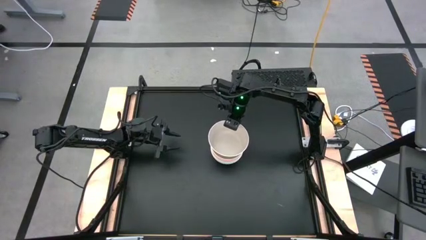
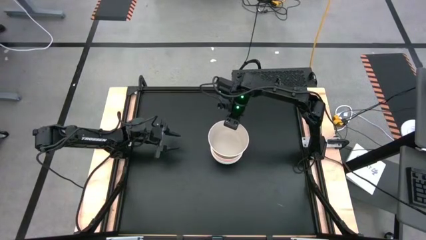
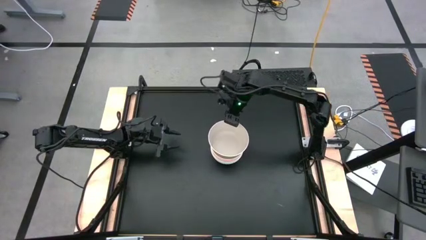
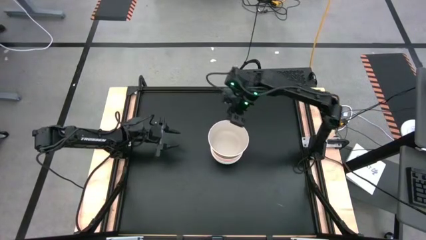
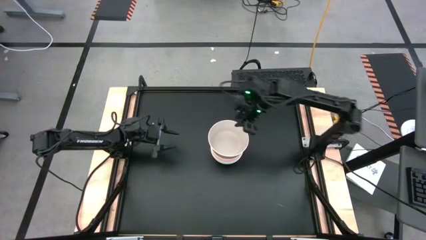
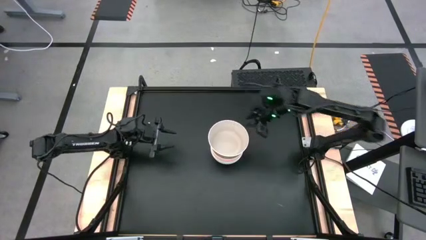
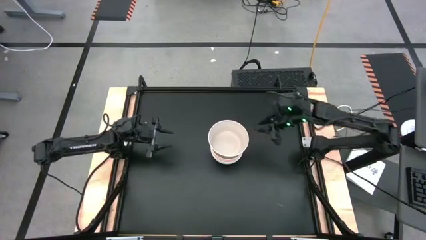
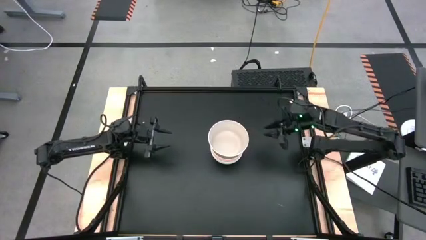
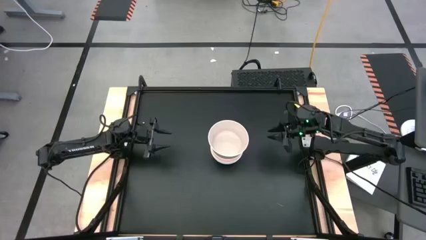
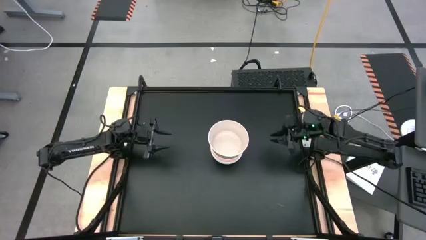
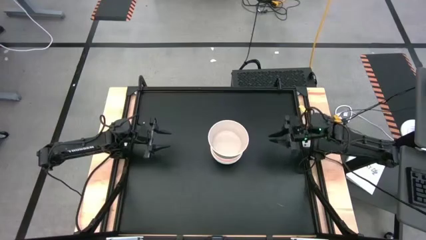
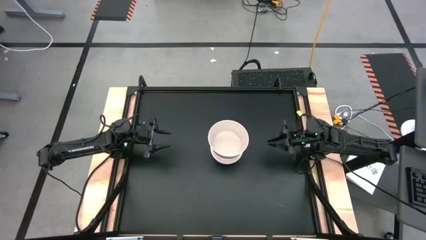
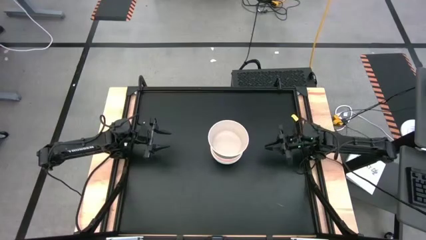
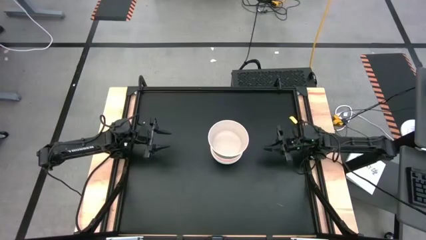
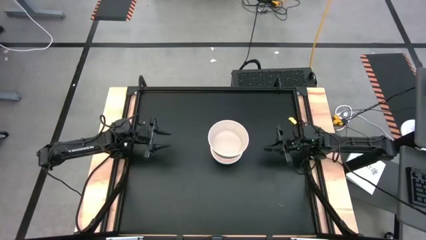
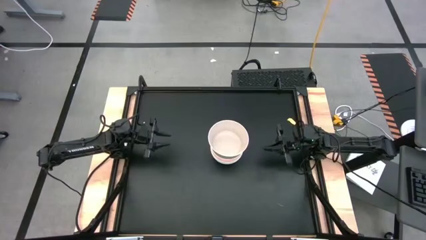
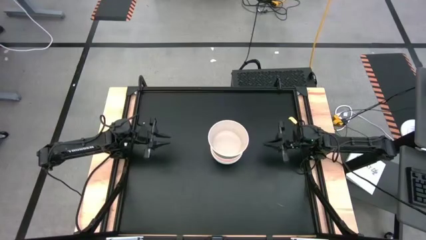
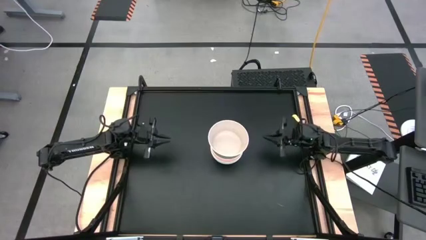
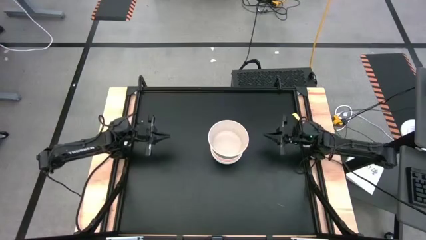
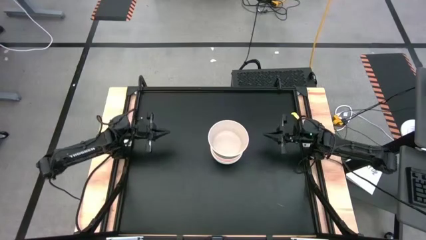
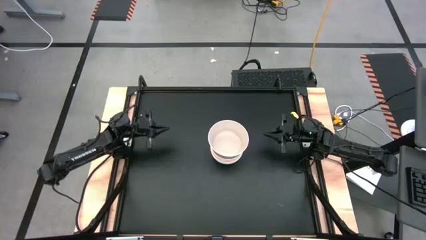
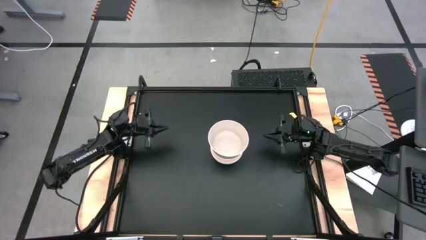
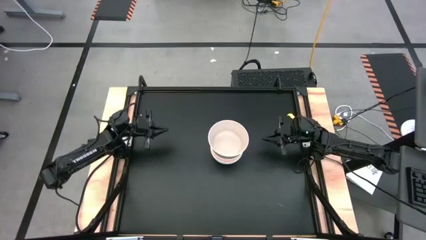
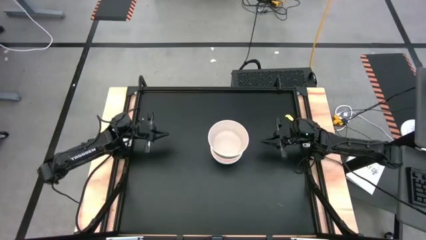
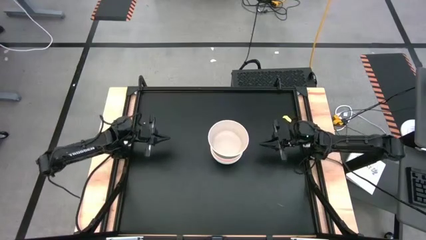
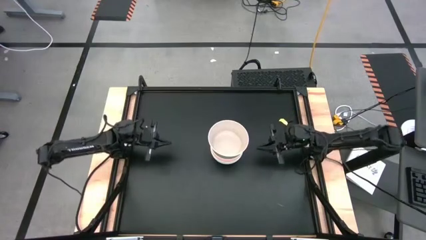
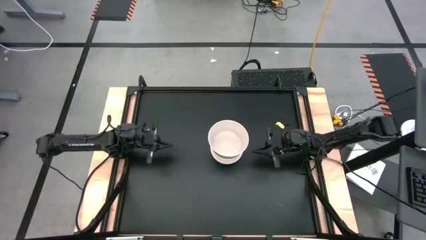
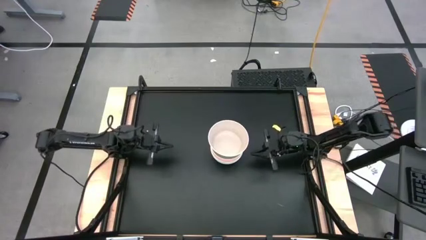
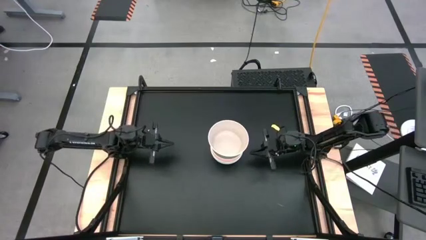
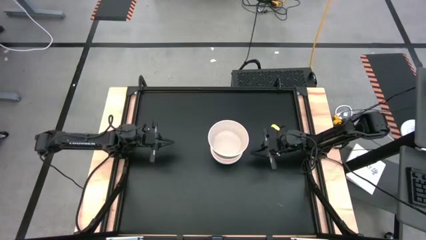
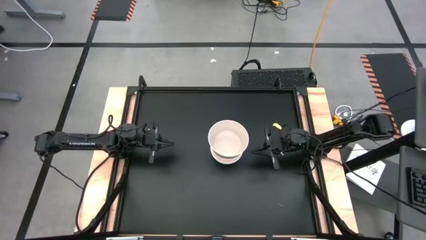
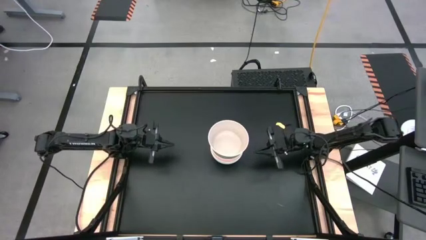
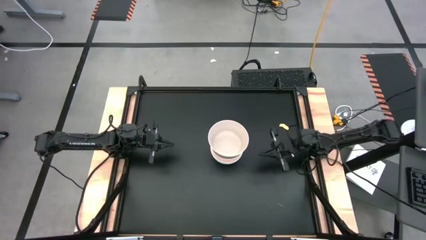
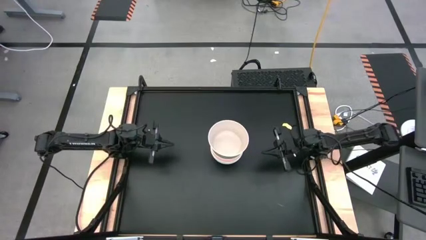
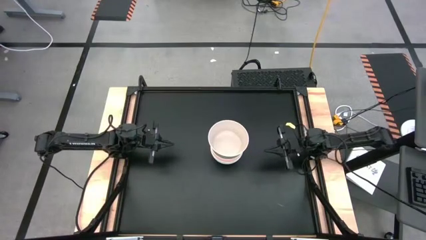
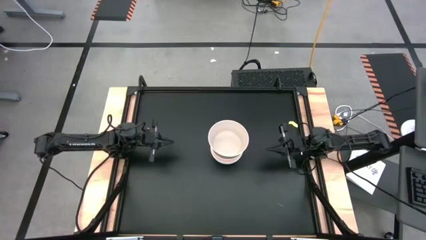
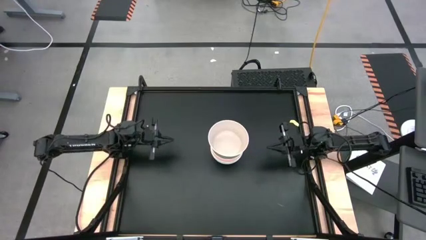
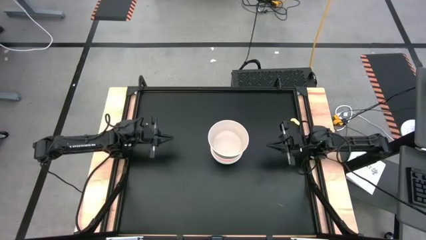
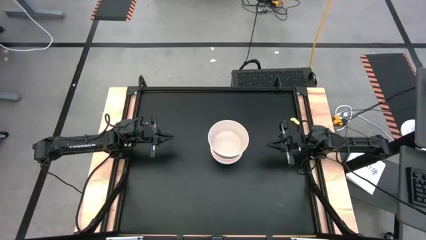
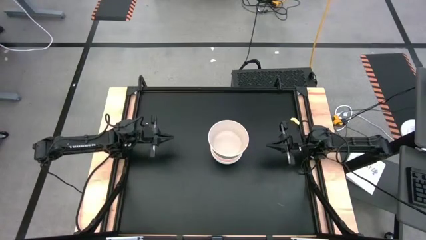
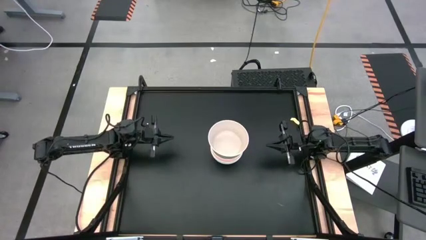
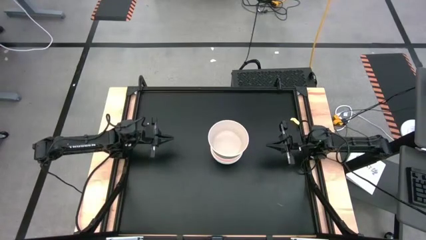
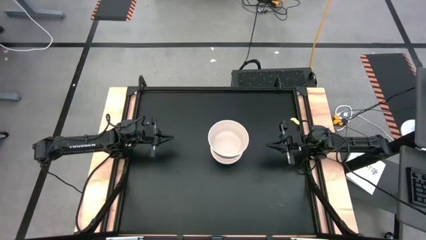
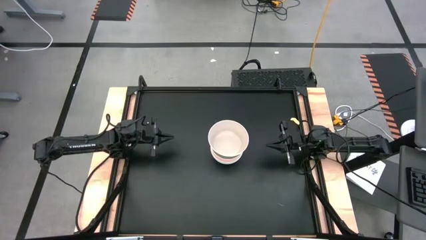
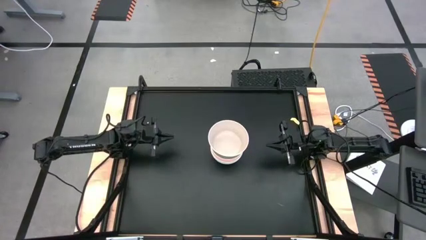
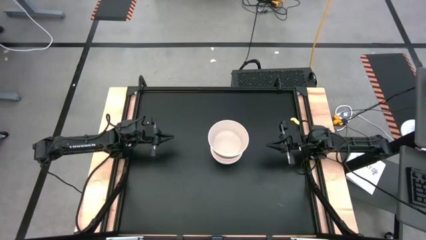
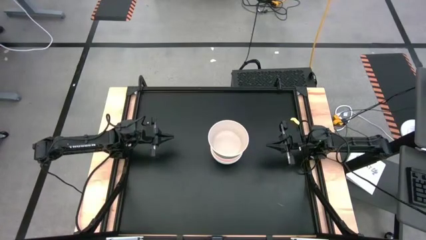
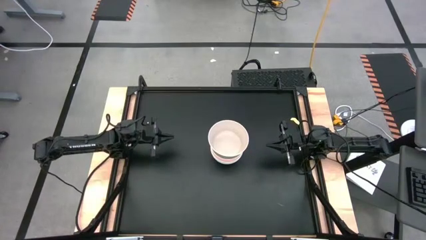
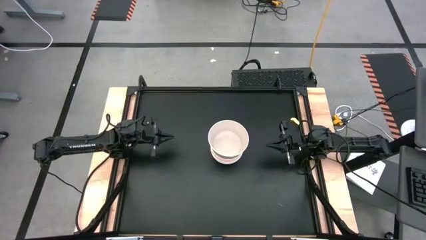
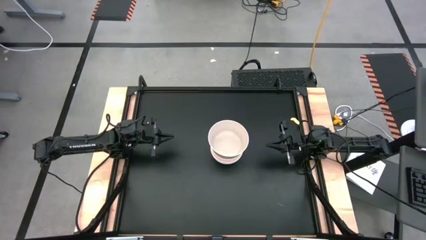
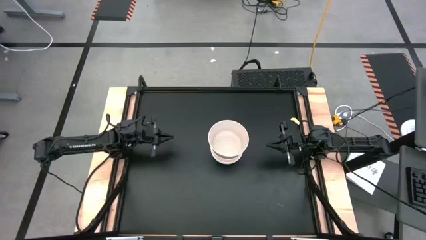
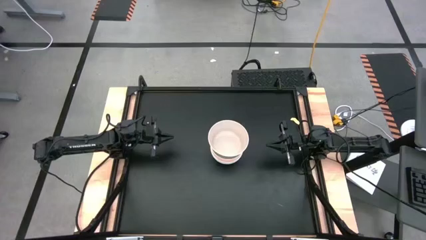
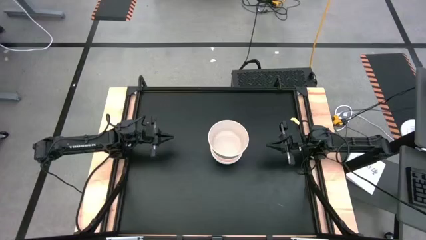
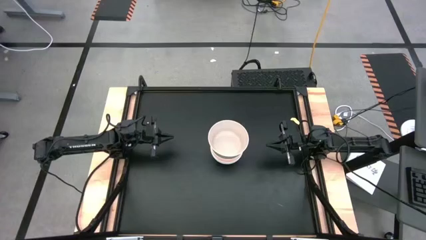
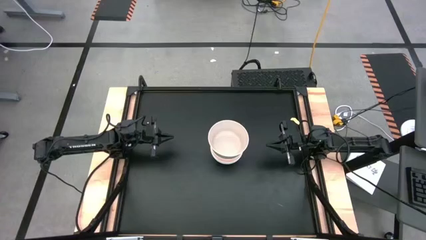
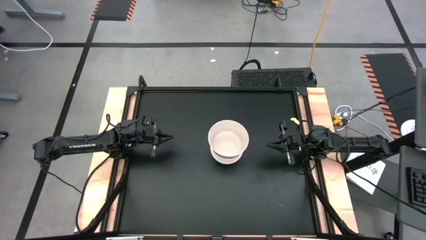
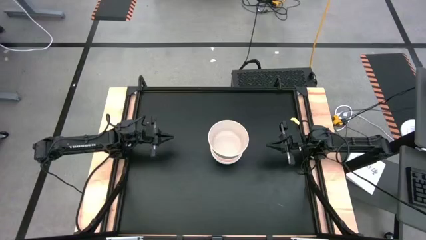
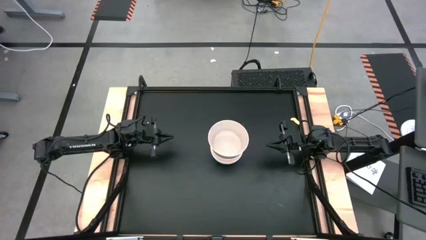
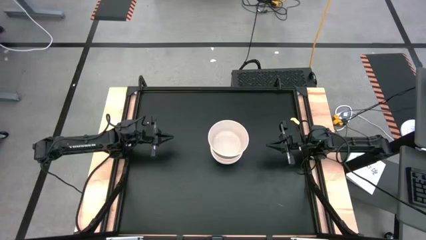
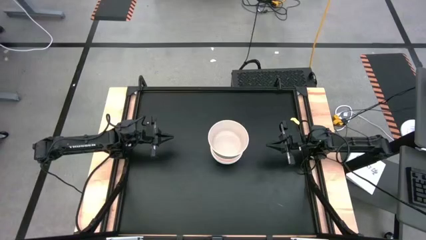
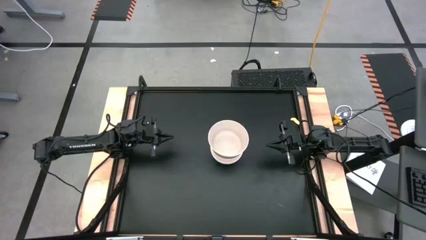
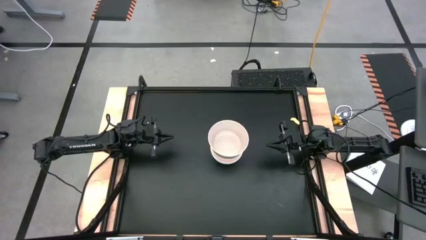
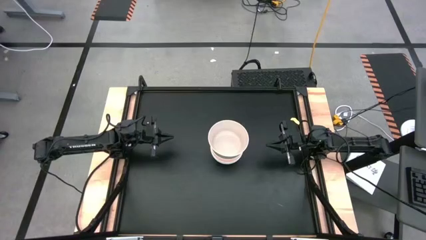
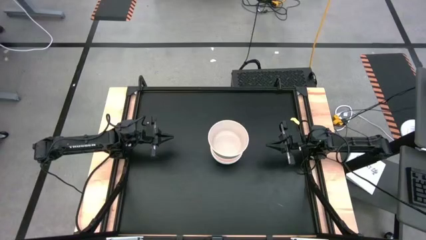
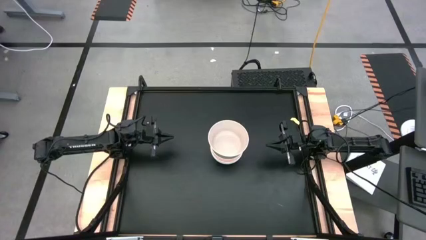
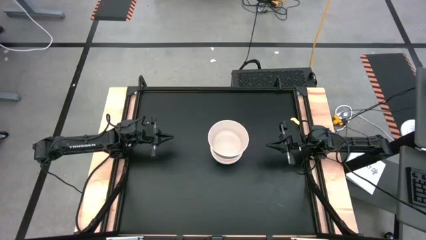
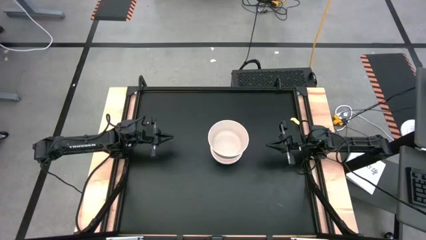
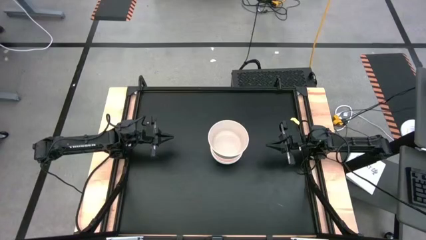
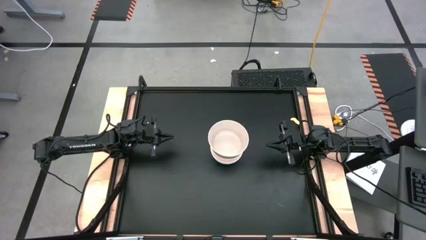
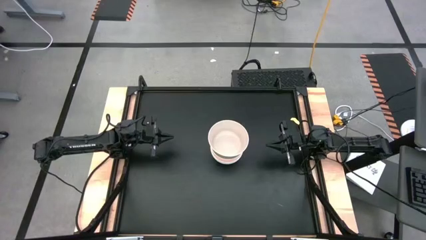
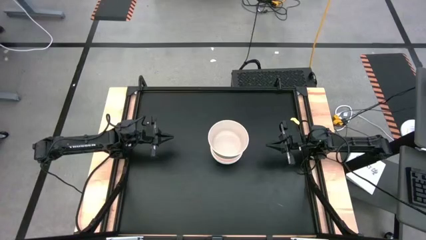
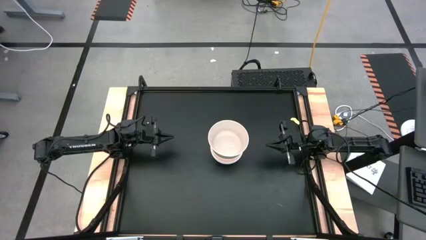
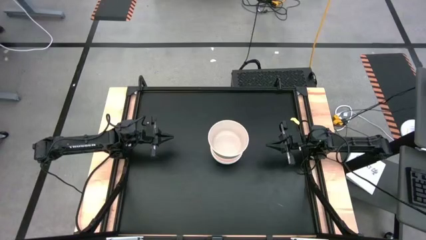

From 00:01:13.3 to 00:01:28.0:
Task: Nest bowls inside each other
Return to Home Position
